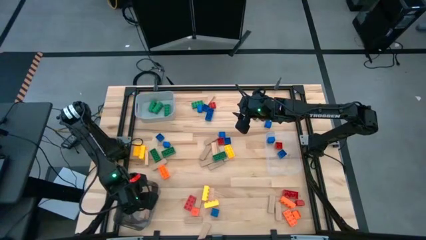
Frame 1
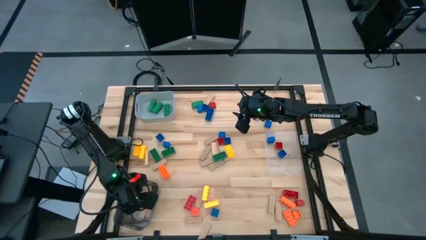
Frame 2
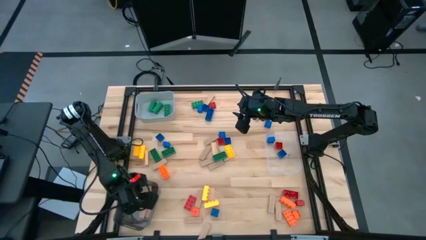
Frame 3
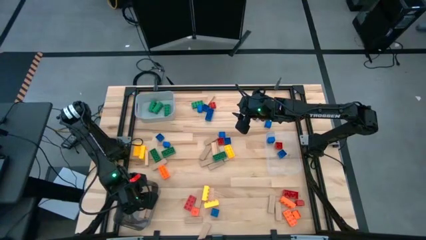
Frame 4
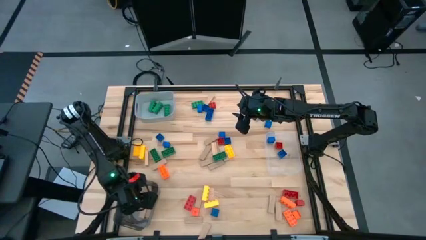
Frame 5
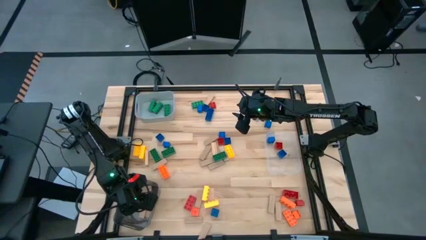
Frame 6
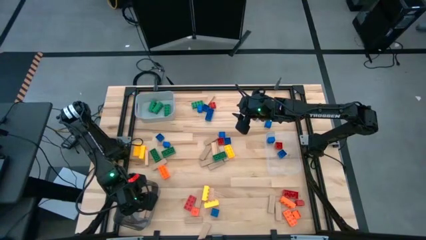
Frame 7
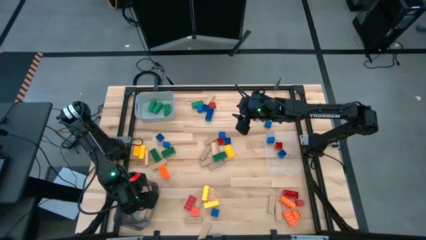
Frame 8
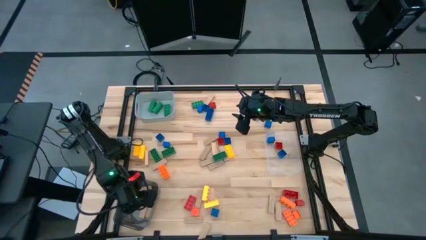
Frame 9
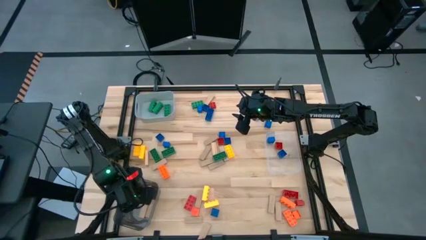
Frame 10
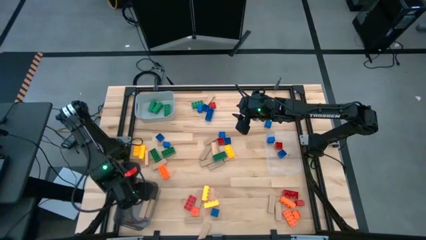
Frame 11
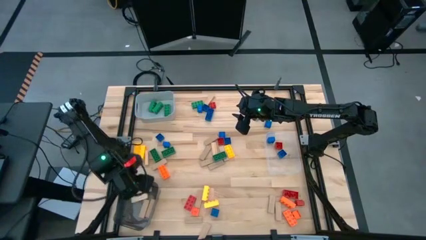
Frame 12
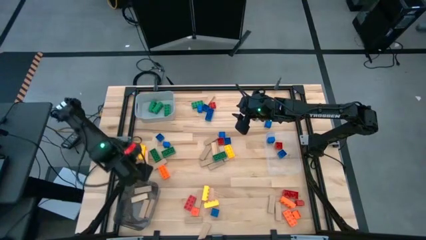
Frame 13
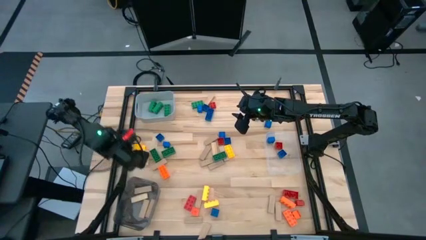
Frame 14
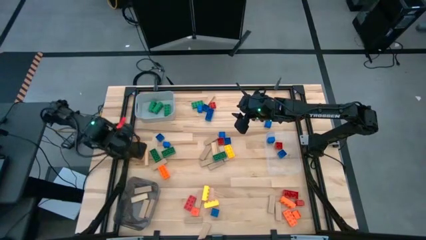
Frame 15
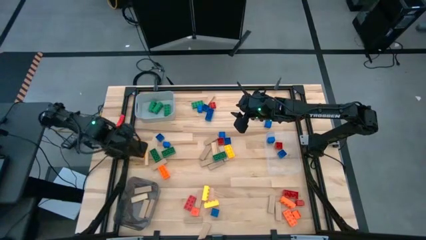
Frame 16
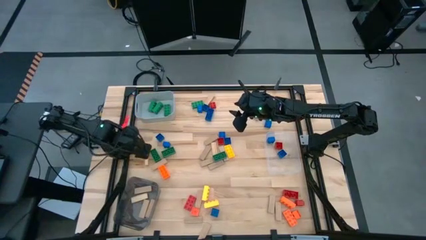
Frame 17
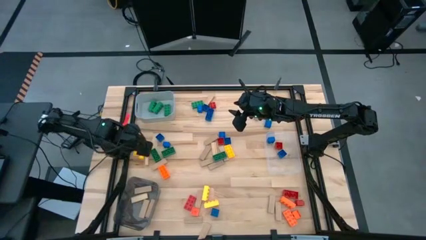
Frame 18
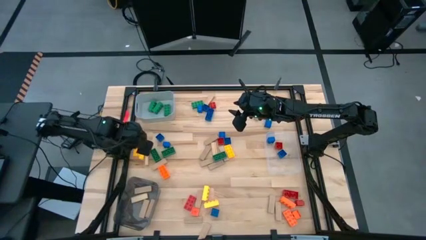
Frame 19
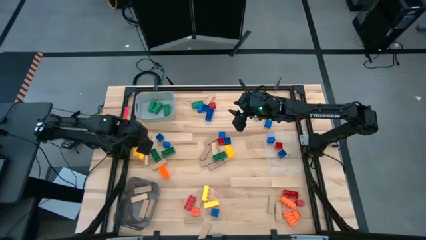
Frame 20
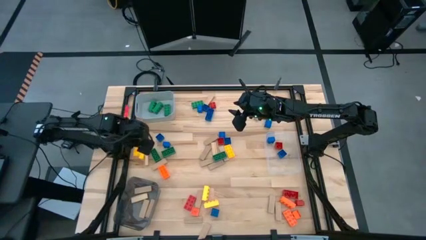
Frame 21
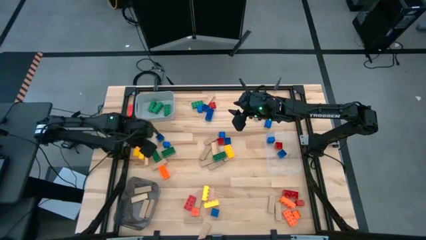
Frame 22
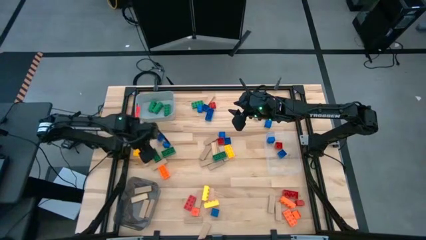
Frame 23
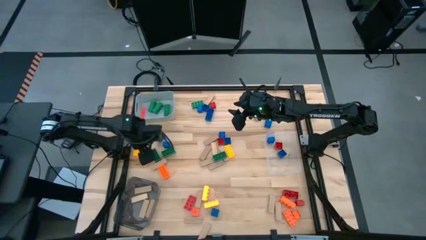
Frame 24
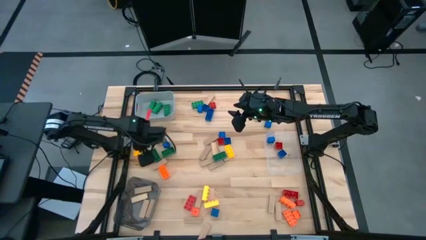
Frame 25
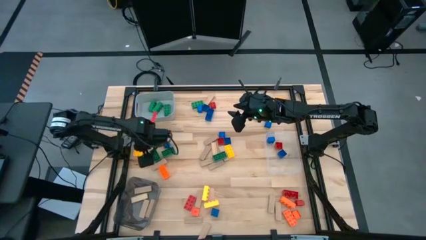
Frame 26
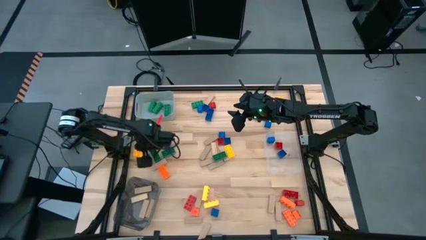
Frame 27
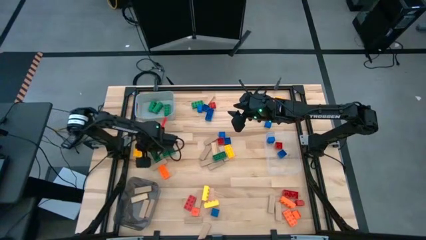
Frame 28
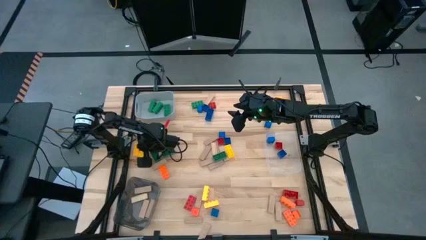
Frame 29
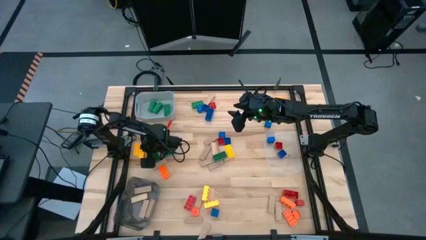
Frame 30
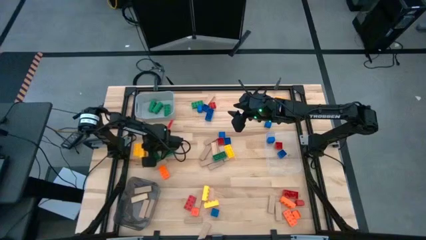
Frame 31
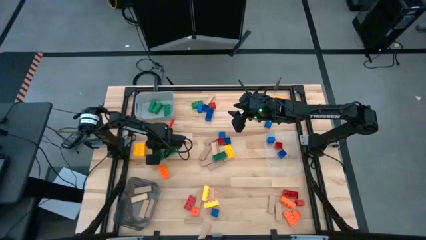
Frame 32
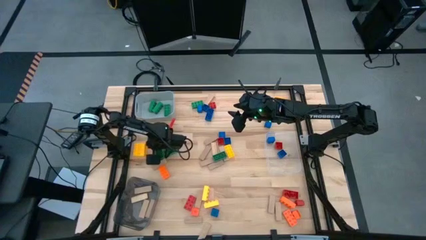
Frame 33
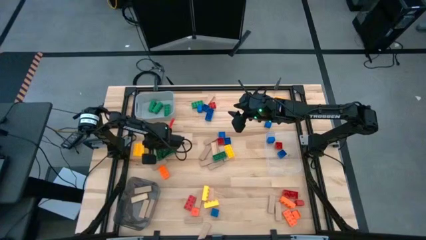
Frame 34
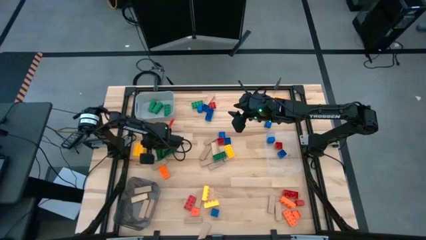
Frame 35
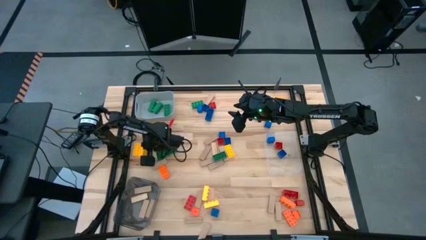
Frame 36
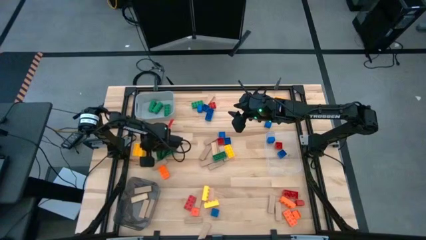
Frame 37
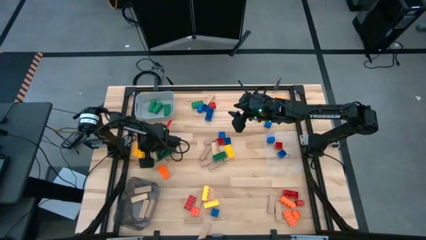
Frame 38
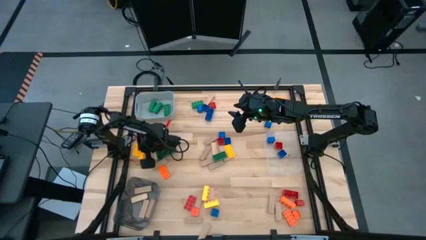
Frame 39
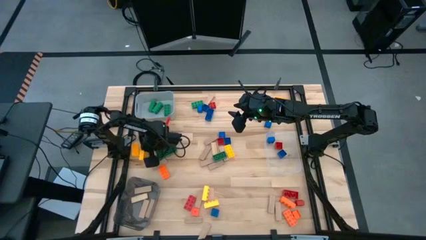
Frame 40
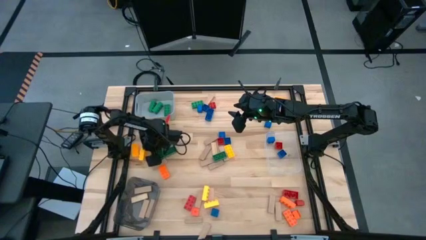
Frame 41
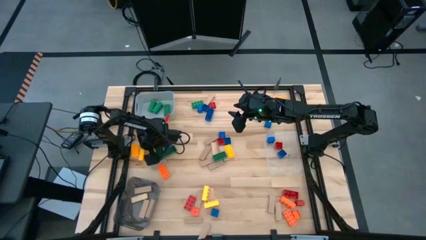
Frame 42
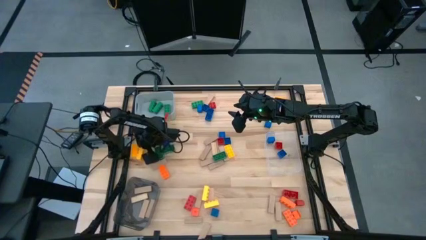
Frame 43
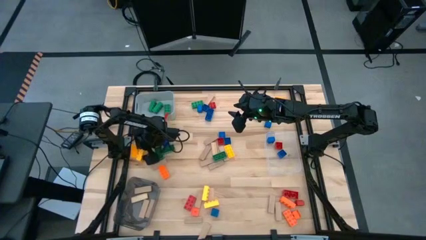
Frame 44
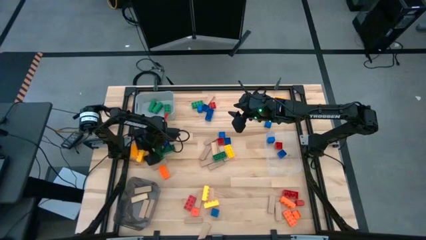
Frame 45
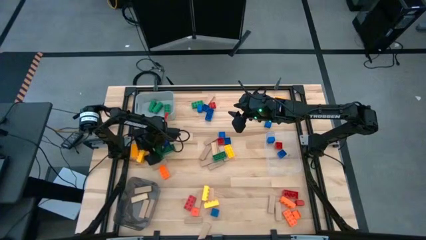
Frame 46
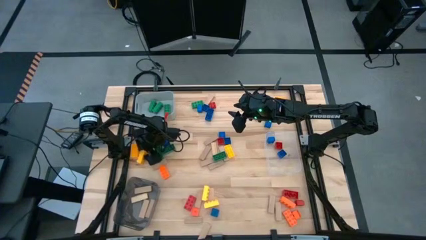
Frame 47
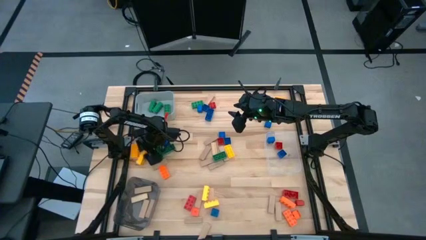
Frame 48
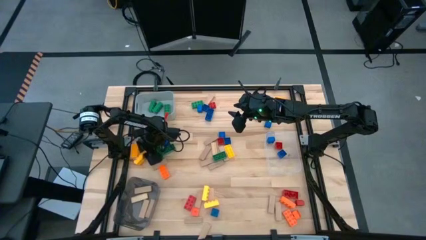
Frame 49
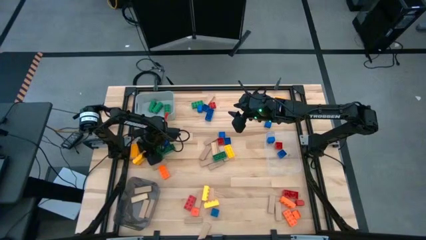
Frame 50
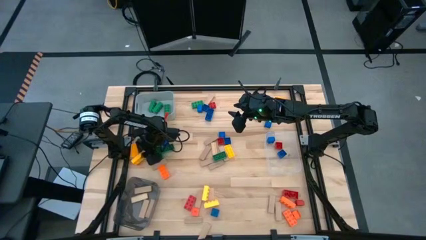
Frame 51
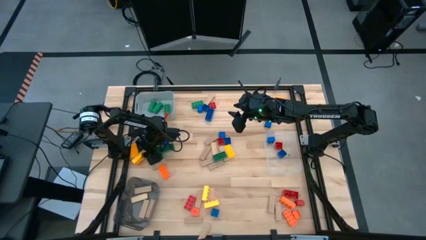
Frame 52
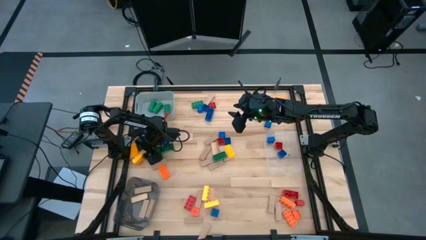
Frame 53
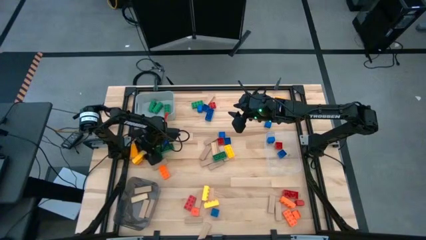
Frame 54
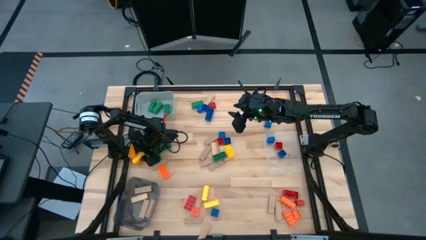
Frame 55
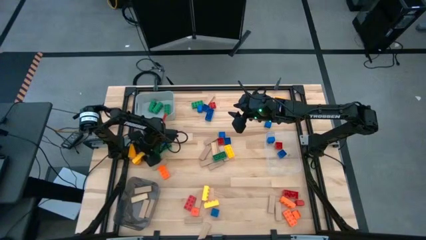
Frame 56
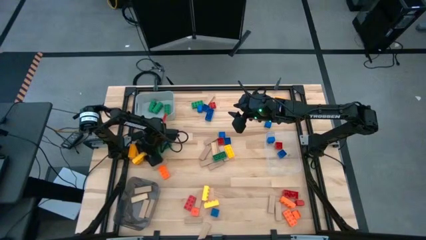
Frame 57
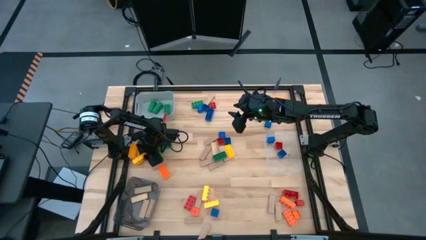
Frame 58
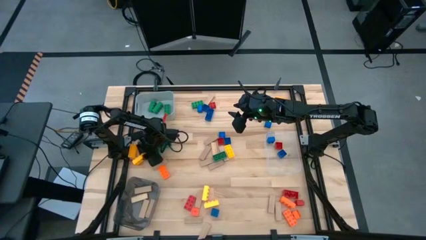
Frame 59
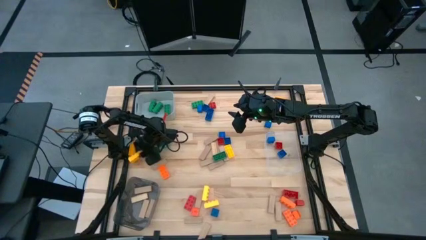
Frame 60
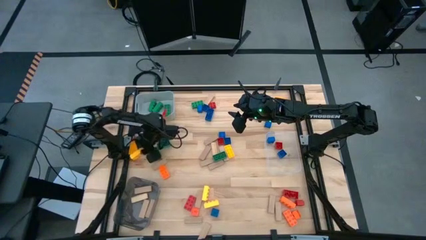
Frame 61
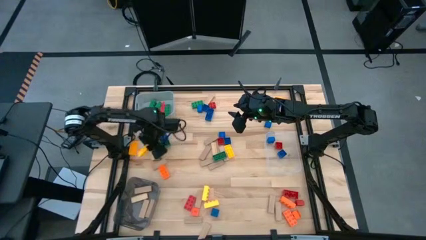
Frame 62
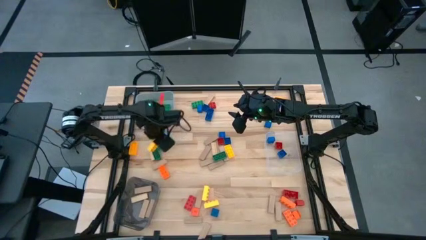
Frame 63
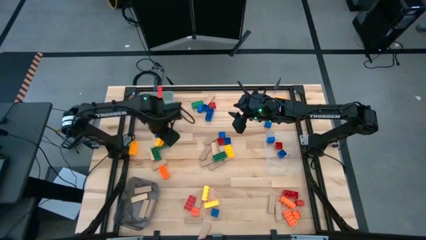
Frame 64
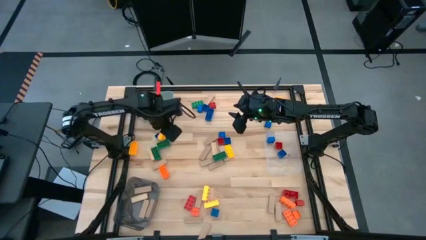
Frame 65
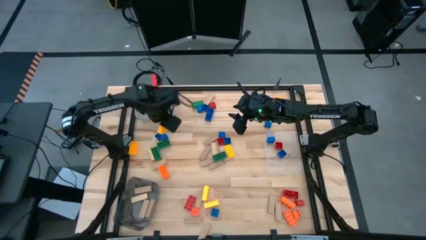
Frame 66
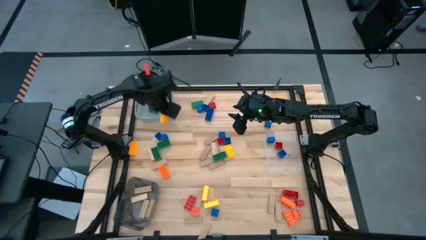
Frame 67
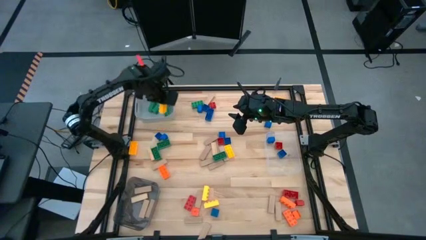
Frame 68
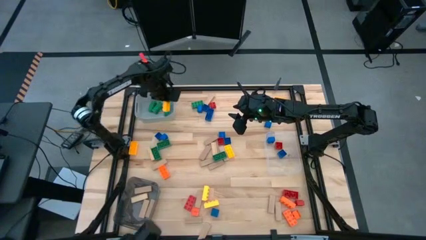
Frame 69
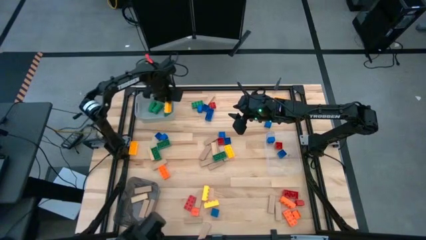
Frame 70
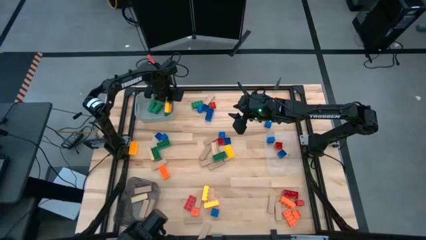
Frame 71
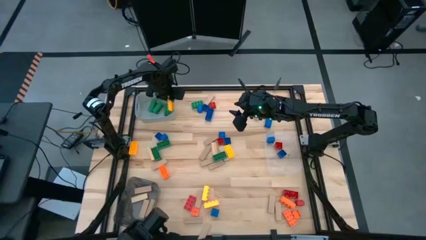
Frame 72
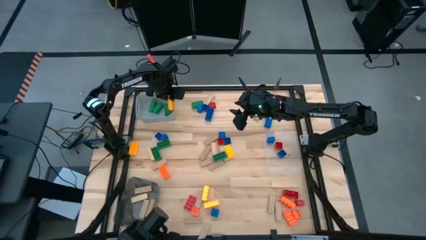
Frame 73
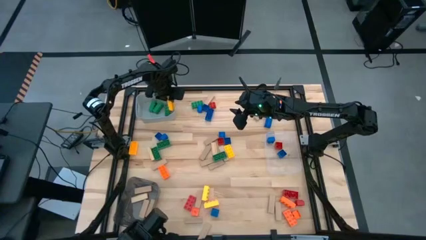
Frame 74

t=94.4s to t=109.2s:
Task: Sort blocks by size
Put the large yellow game piece into the gray bin
